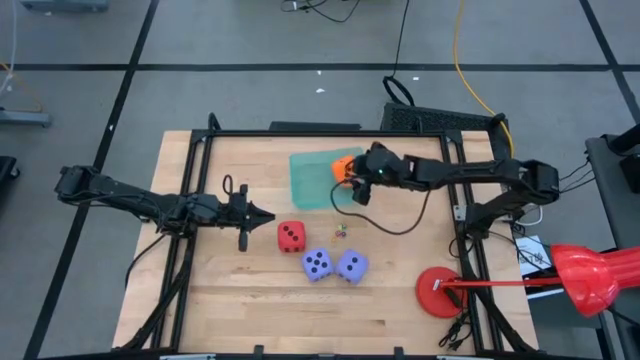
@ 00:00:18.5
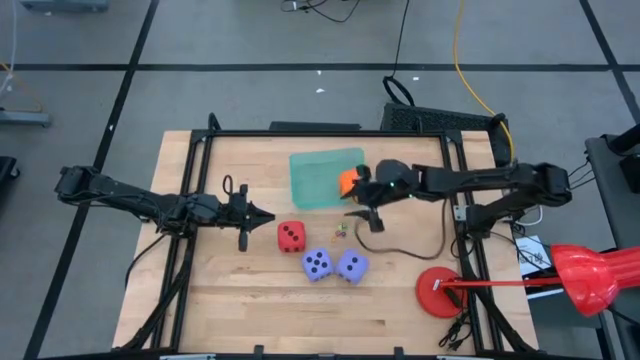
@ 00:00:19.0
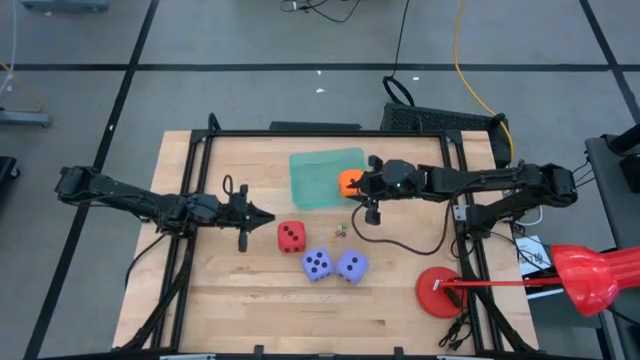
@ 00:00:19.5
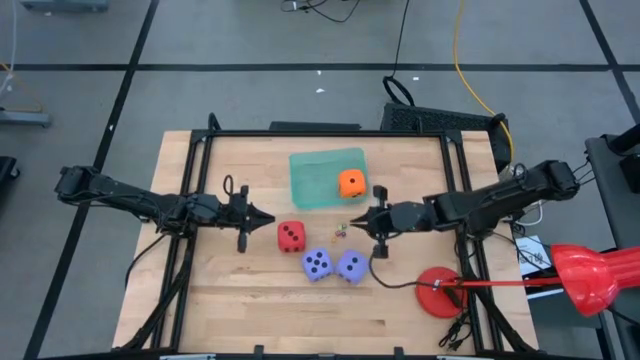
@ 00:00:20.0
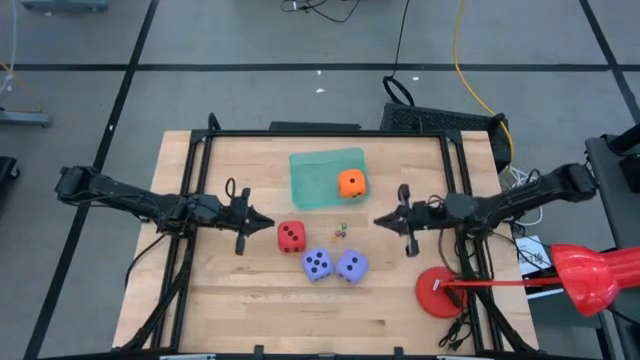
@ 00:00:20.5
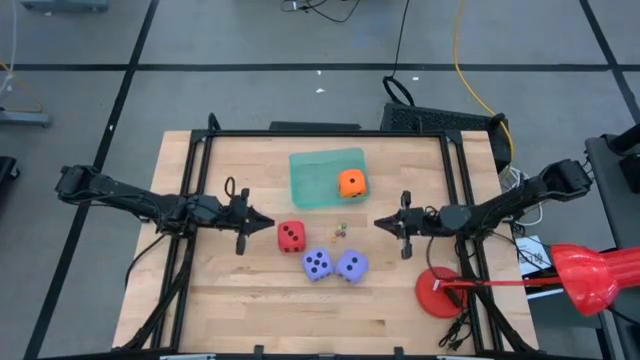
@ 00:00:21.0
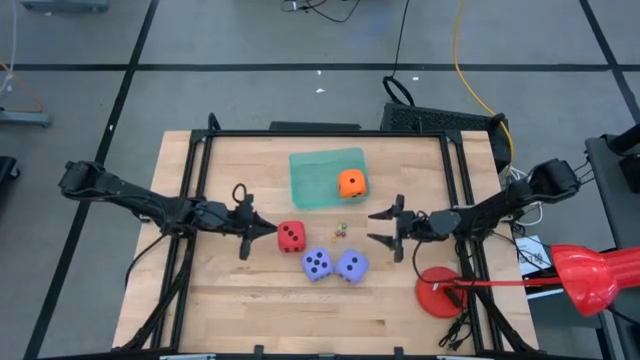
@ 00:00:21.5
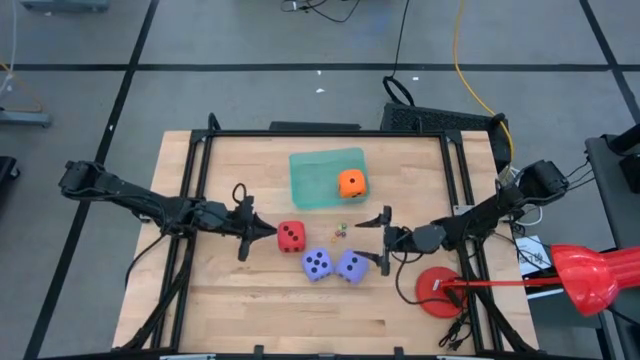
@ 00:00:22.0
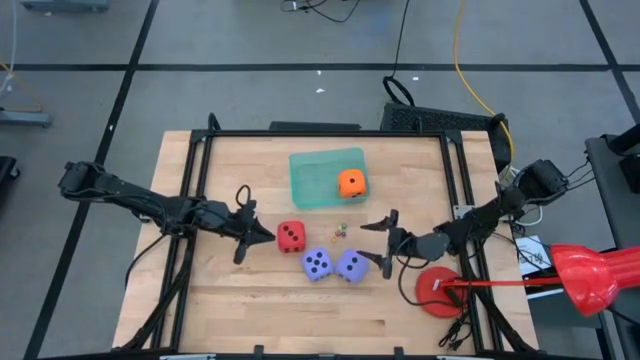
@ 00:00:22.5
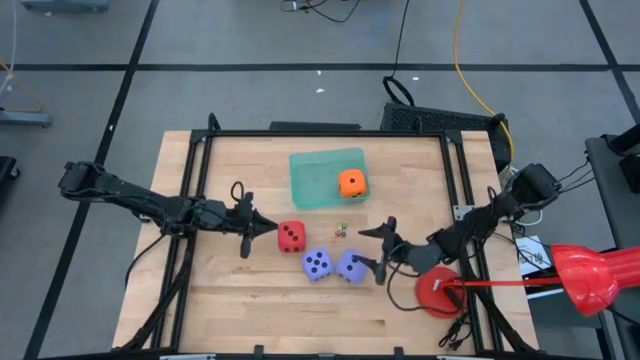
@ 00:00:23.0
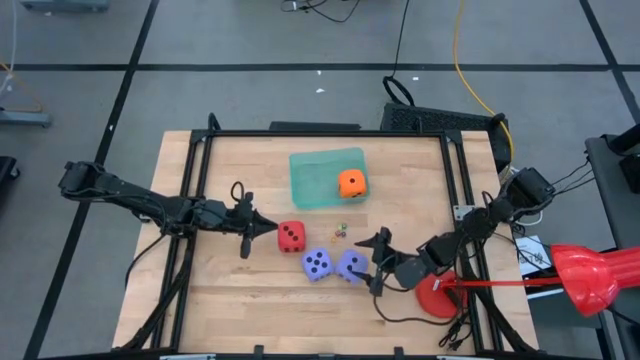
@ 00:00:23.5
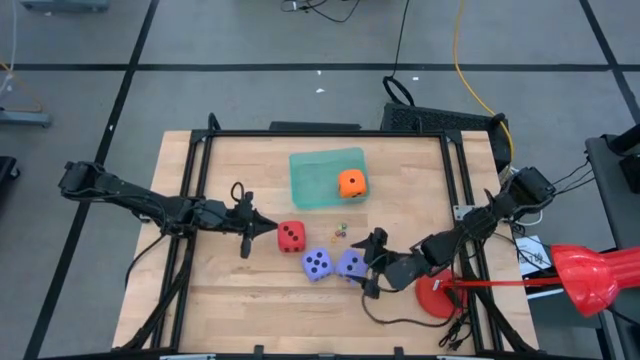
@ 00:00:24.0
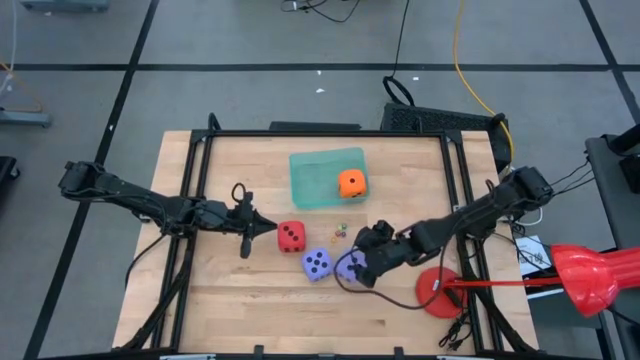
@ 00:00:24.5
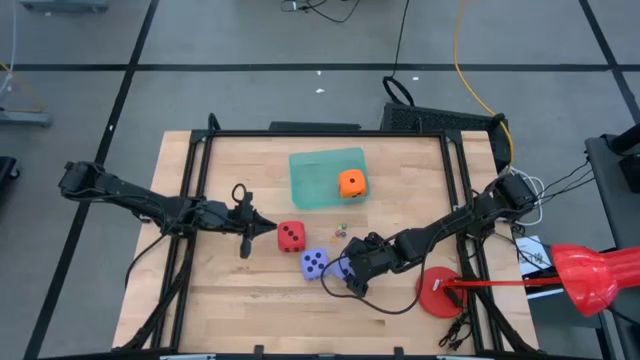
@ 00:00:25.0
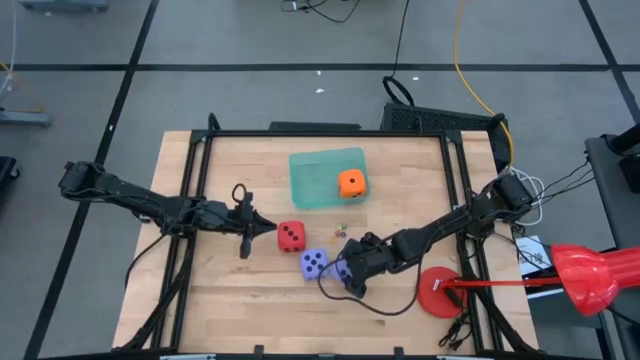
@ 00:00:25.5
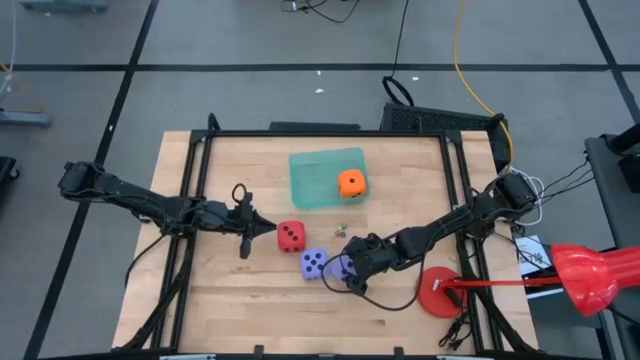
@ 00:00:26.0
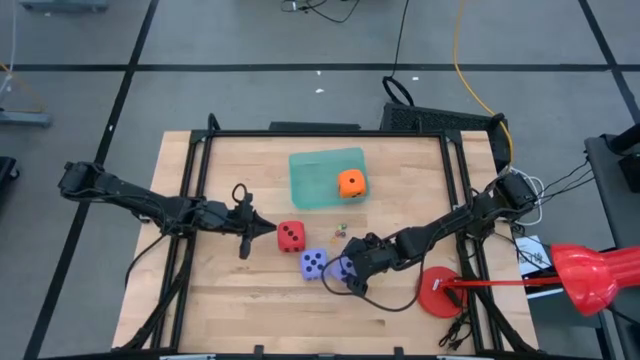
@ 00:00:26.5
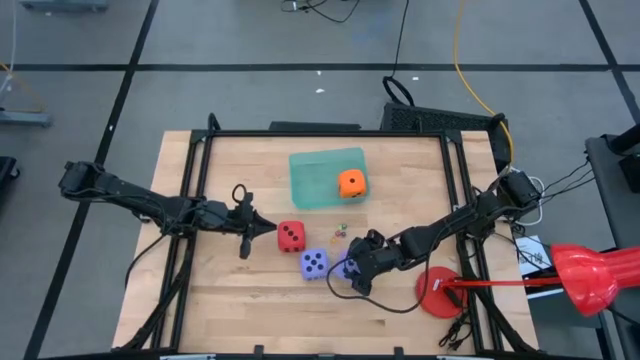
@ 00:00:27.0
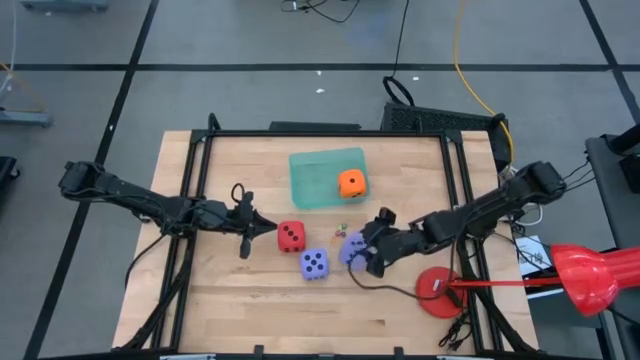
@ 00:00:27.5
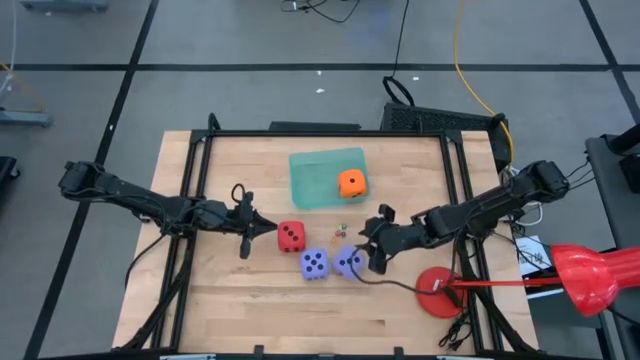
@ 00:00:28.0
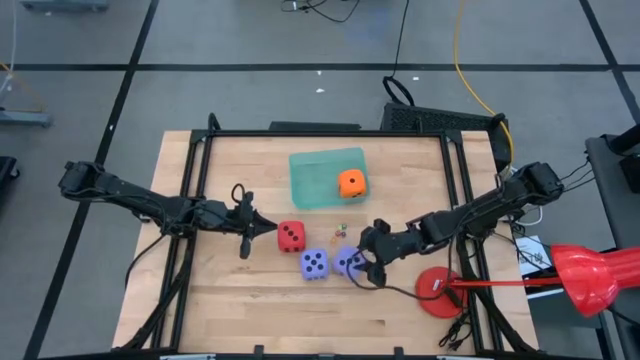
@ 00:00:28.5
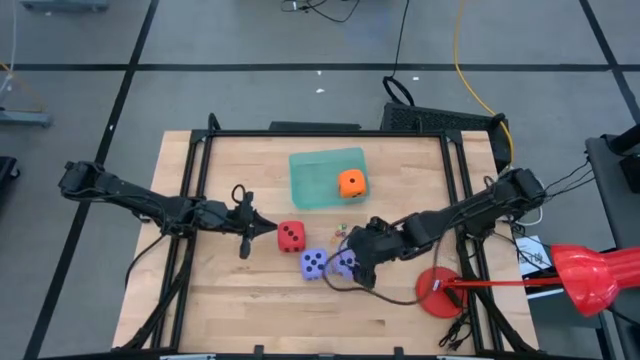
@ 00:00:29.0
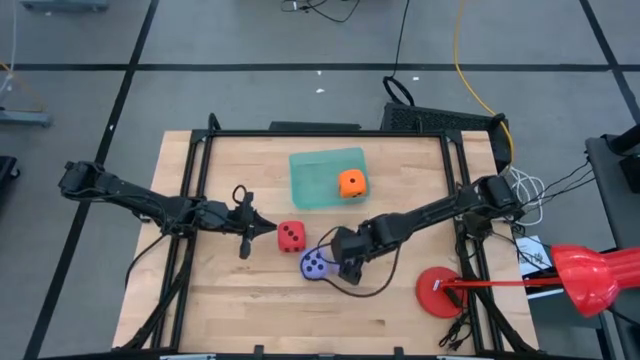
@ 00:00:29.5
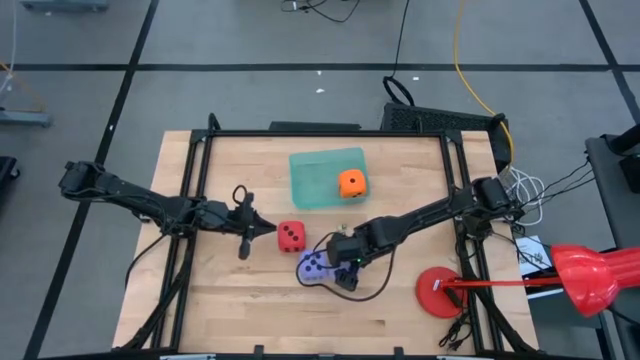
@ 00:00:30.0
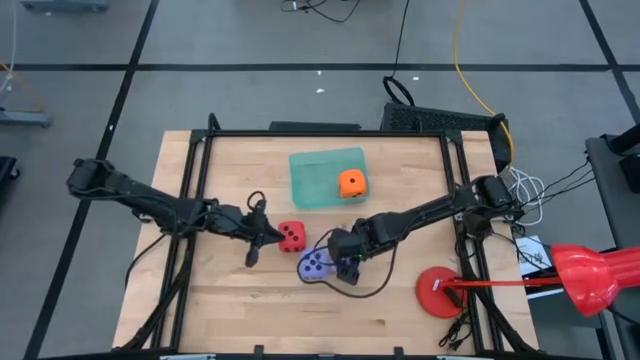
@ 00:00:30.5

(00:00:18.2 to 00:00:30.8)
Task: Pick & Place Dice
Put the right large blue dice into the basket

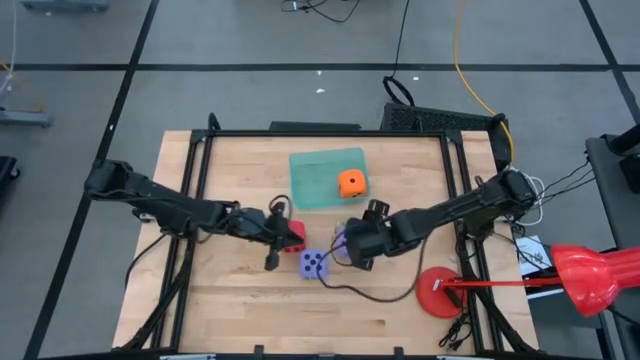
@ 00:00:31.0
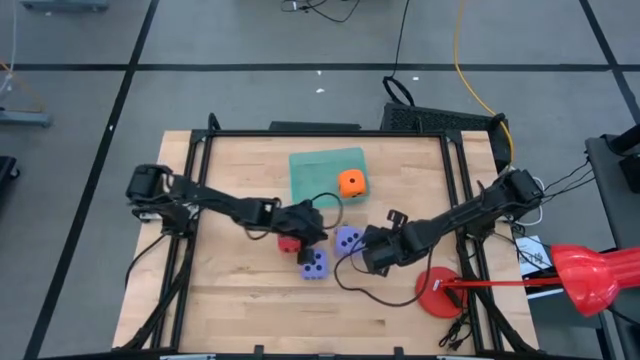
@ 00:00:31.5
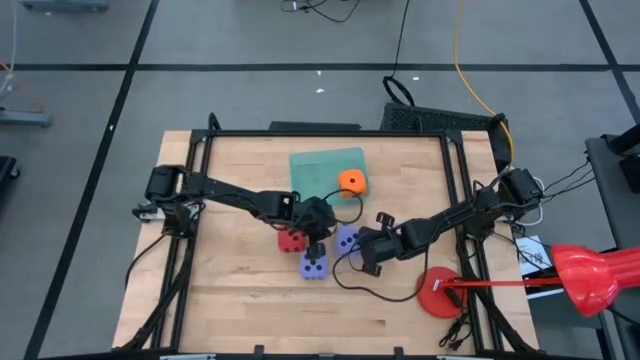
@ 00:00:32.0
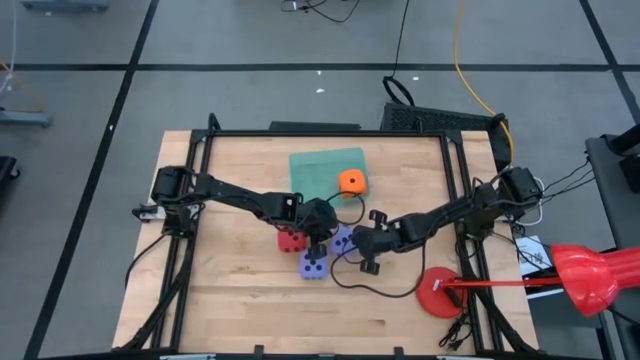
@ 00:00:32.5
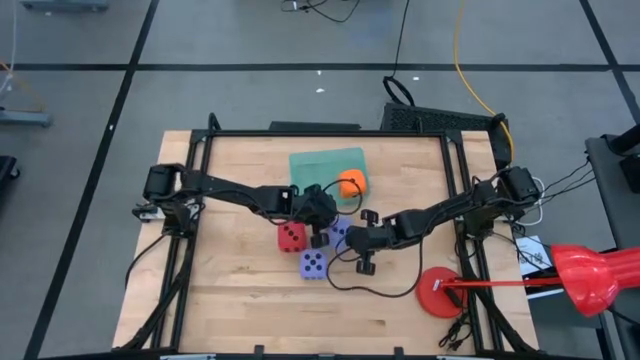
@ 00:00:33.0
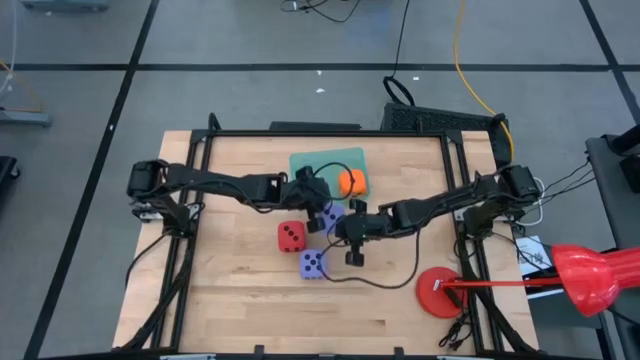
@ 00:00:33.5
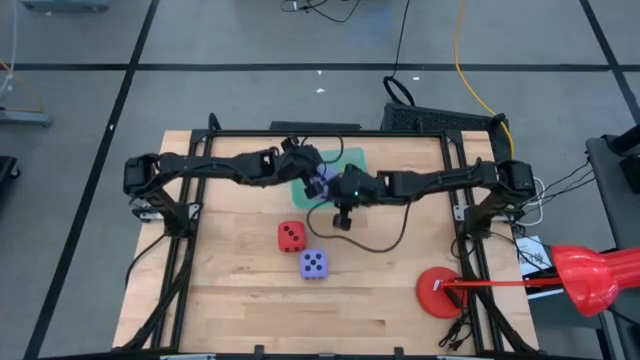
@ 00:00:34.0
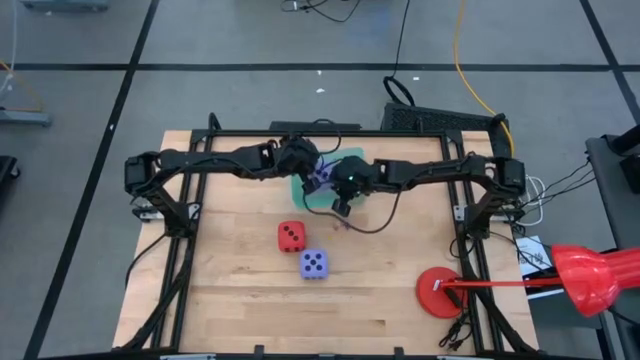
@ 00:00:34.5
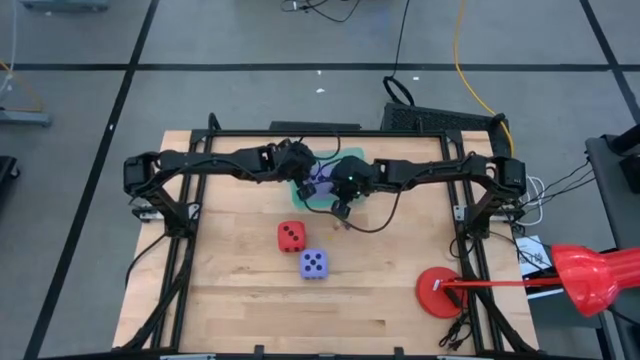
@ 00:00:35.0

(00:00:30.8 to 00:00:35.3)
Put the right large blue dice into the basket

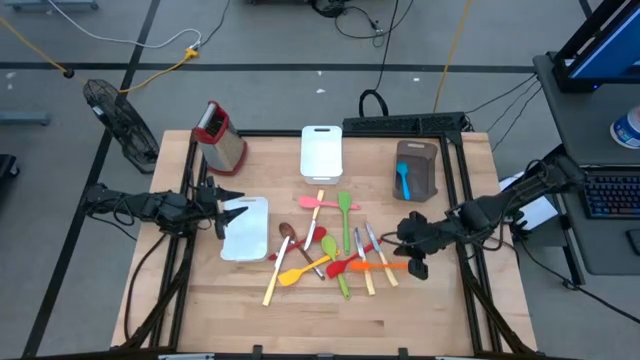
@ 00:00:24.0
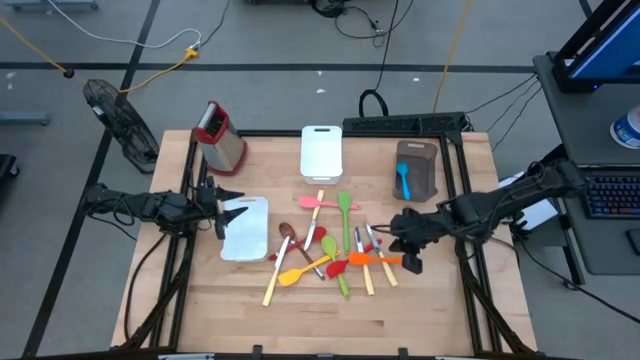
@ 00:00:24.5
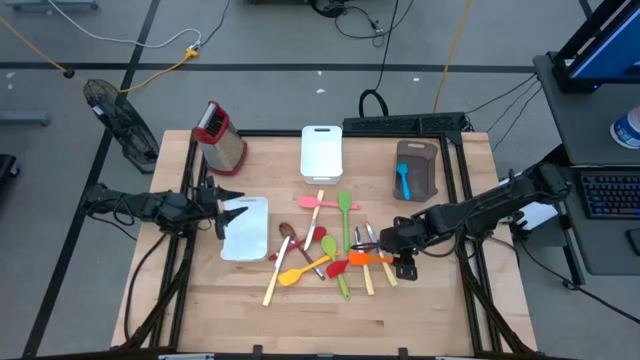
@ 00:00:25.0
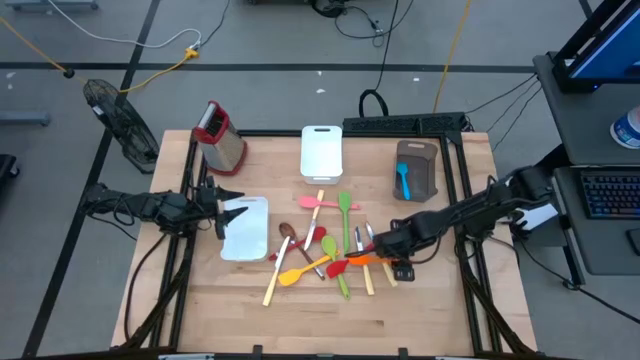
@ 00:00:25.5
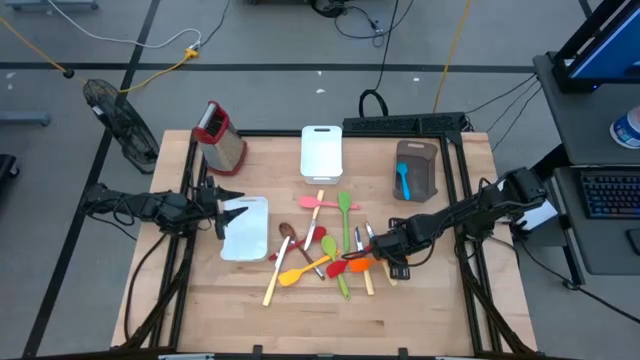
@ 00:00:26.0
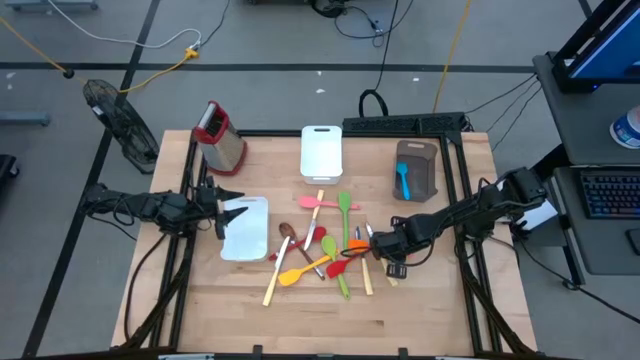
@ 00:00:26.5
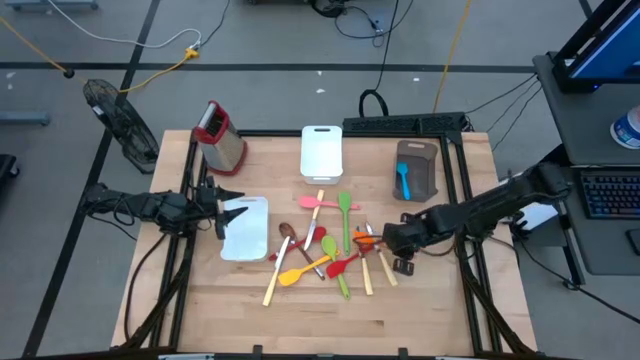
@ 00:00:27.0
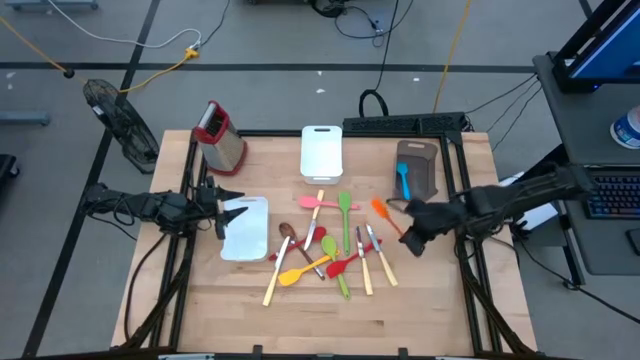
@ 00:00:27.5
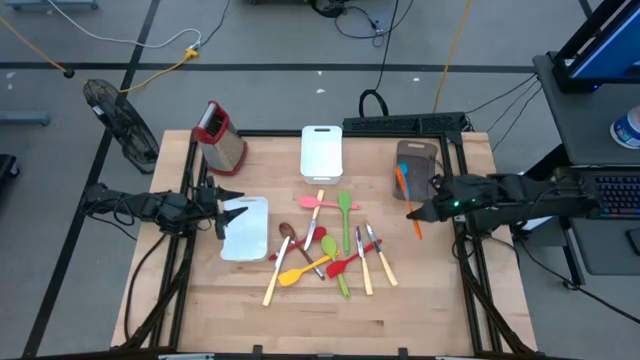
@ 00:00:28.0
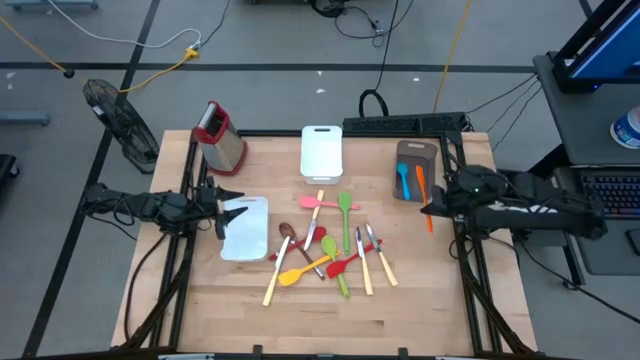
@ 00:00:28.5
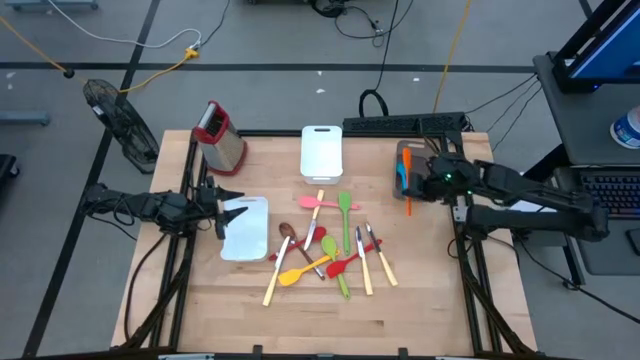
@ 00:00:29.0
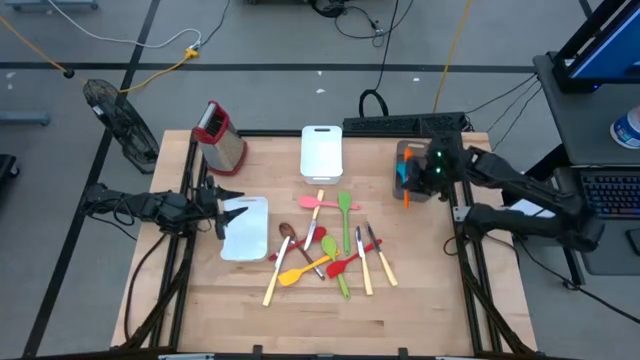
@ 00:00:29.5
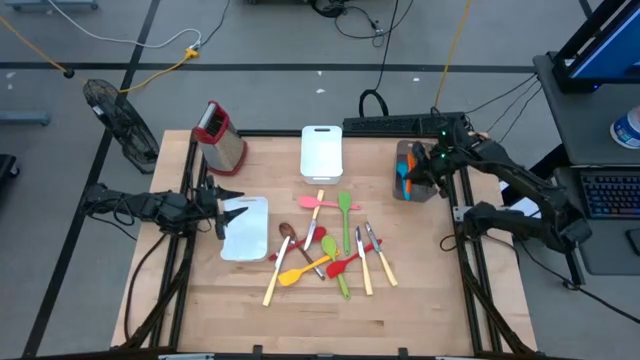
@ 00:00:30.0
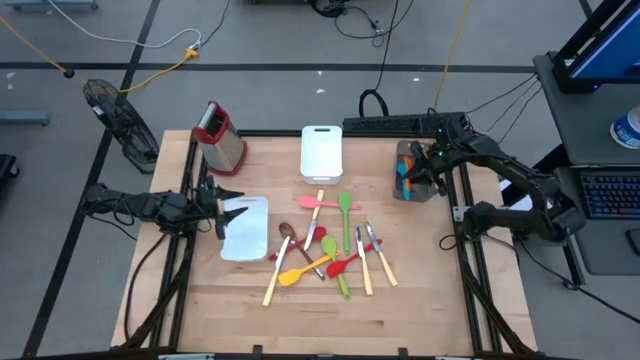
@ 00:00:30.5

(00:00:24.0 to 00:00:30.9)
Task: Pick & Place Kitchen Items
Put the orange spatula into the black bin
